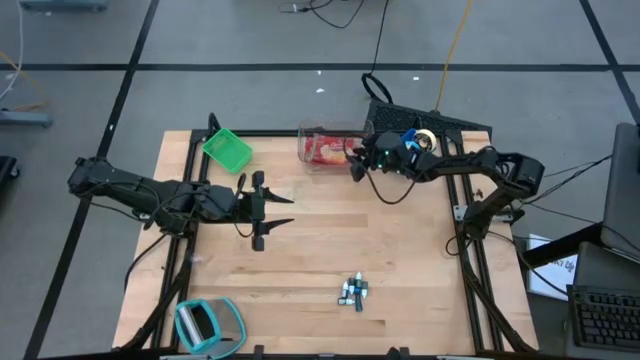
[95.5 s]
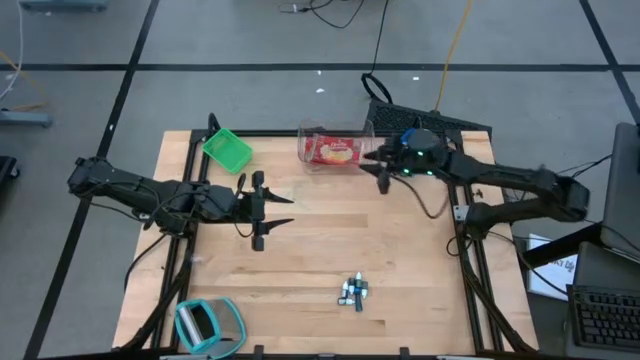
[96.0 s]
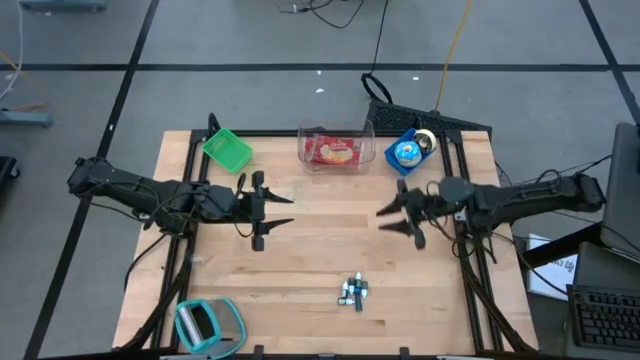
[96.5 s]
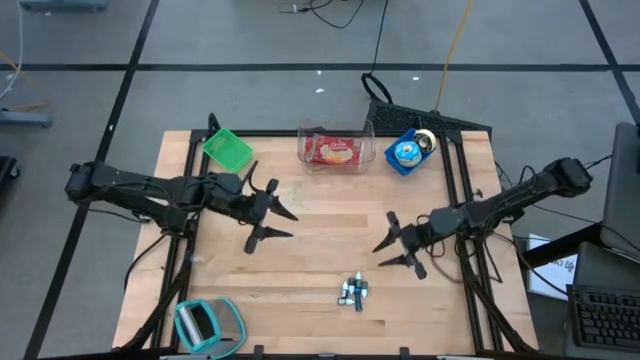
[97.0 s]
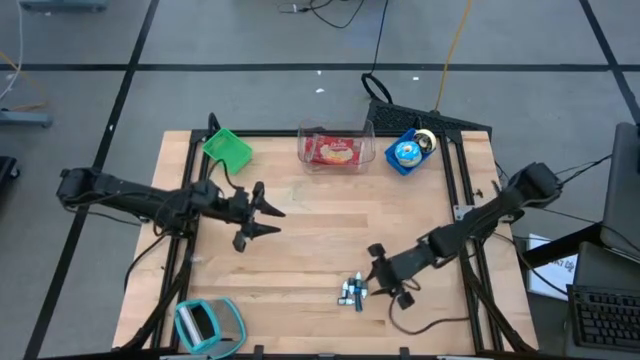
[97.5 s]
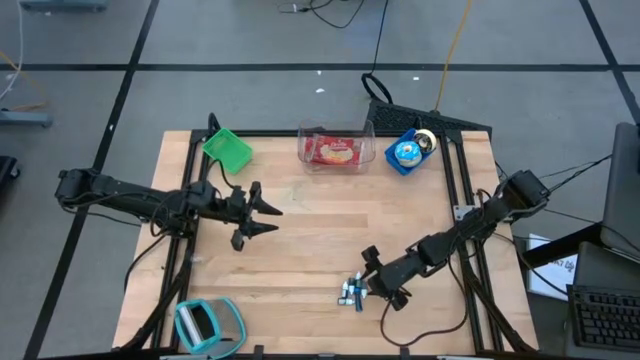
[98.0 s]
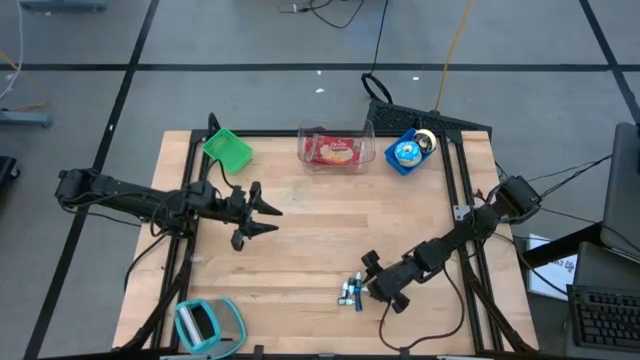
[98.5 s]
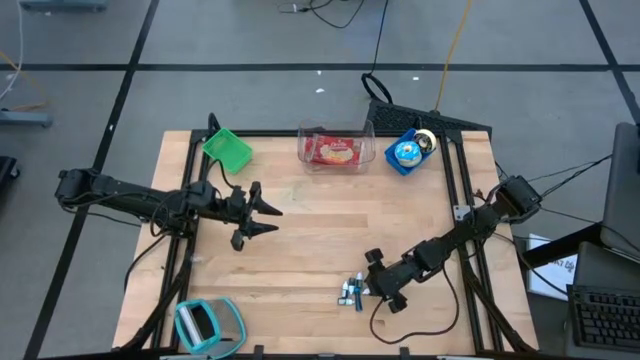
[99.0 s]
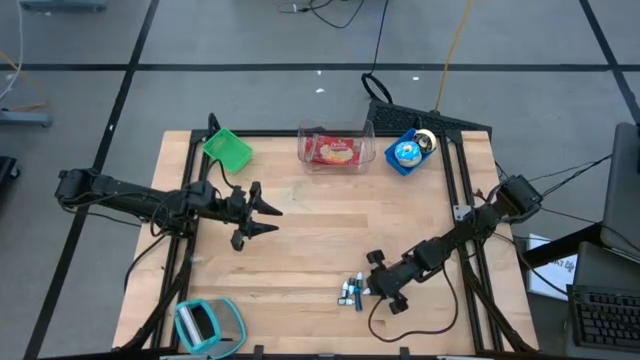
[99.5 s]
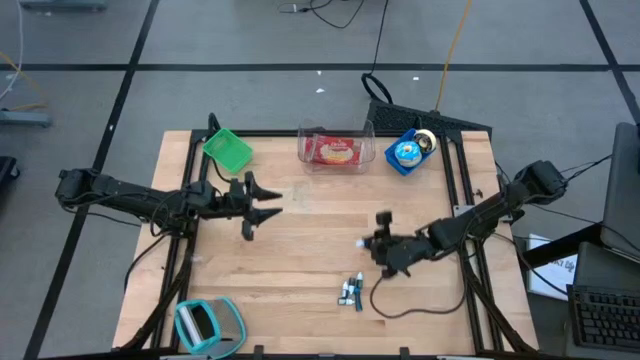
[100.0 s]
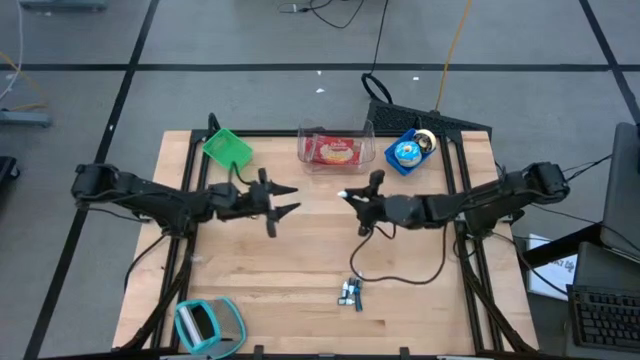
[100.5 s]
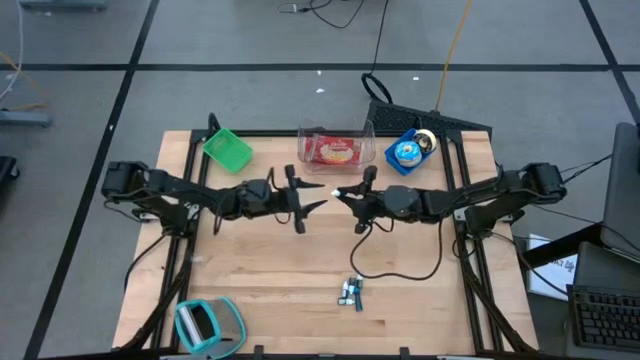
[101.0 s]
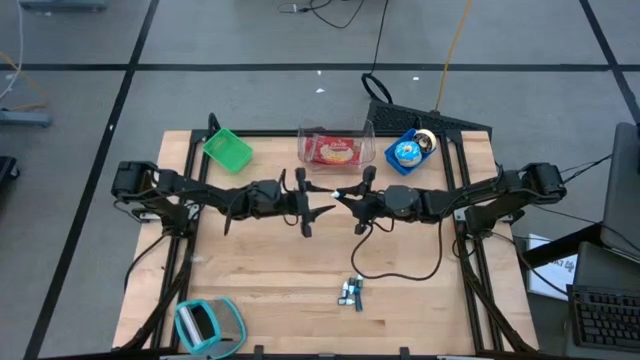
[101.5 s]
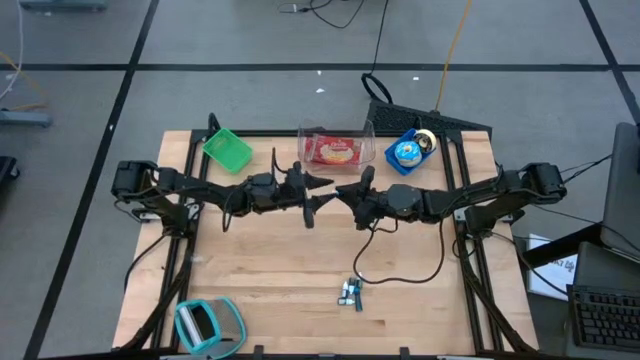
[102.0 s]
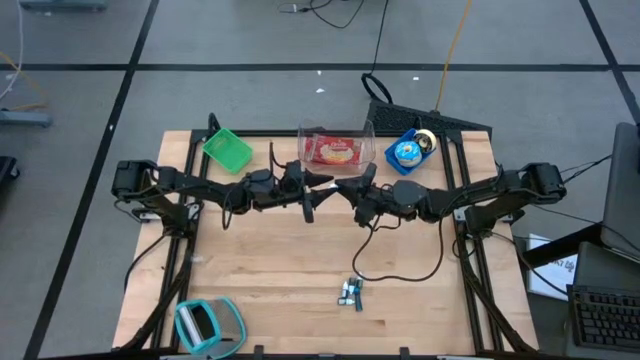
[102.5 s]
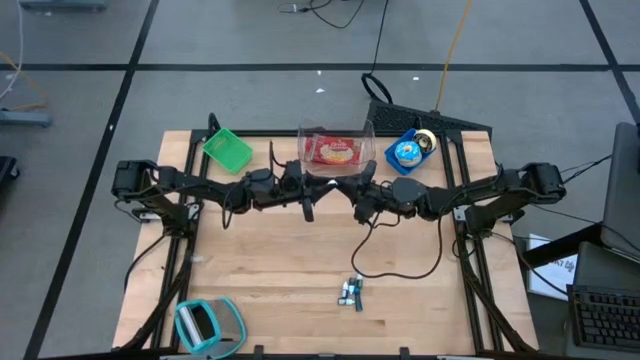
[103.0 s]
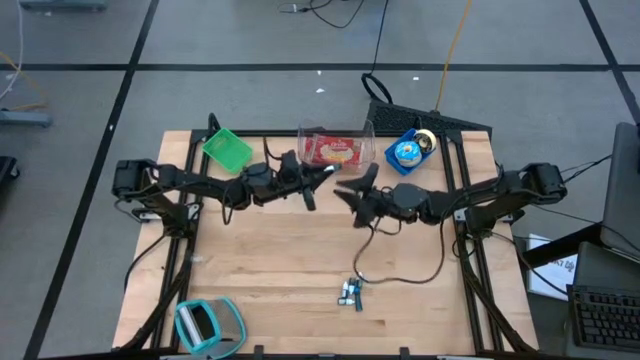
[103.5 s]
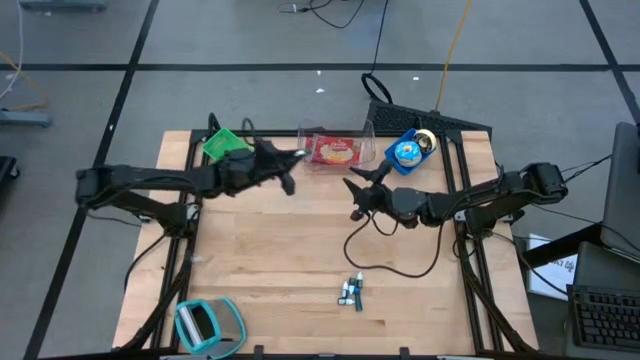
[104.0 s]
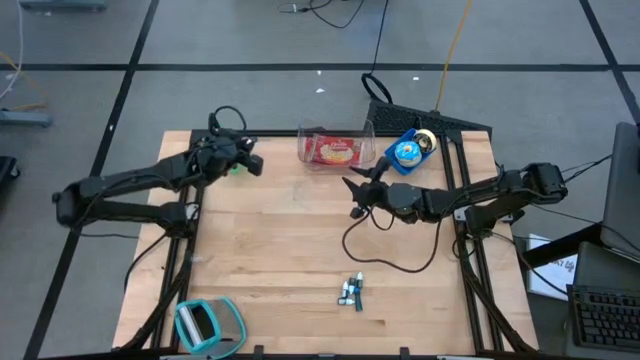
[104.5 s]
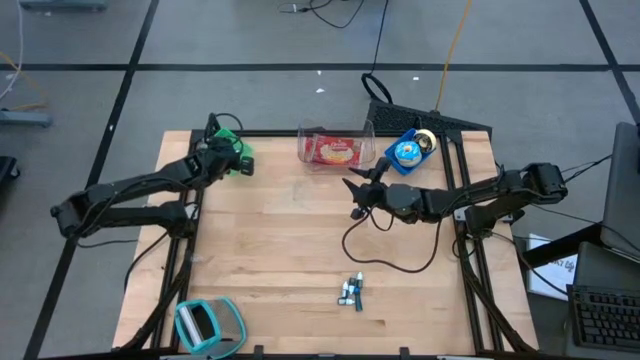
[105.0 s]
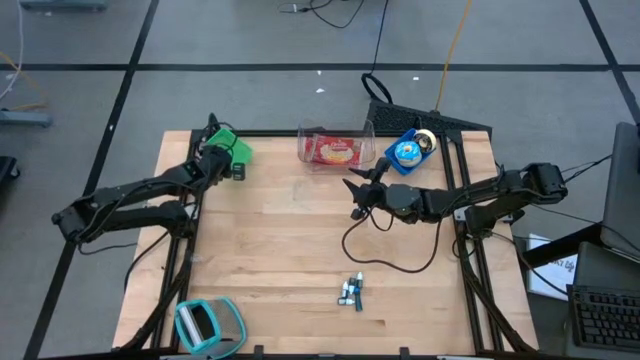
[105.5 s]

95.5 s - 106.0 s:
Put the blue food coloring bottle into the green bin

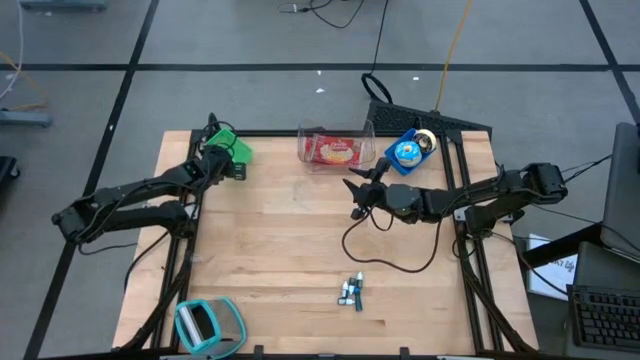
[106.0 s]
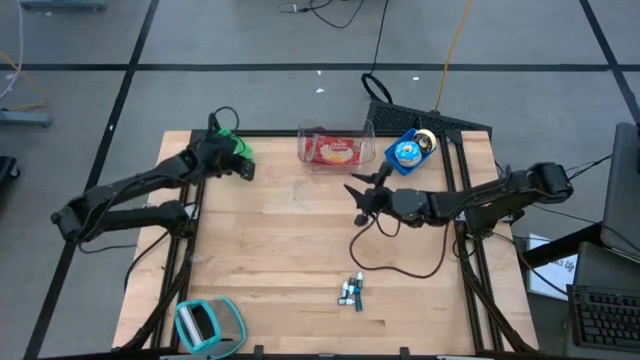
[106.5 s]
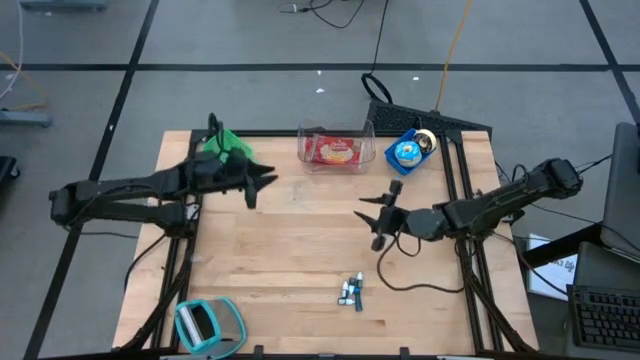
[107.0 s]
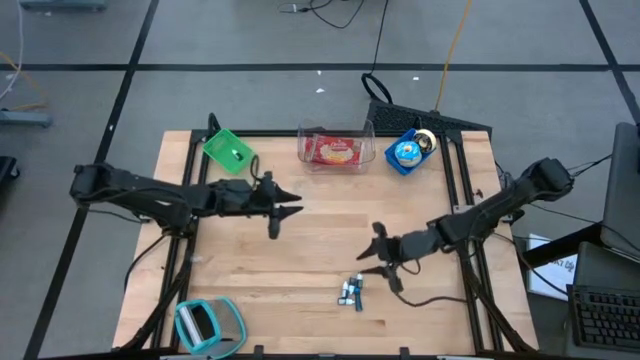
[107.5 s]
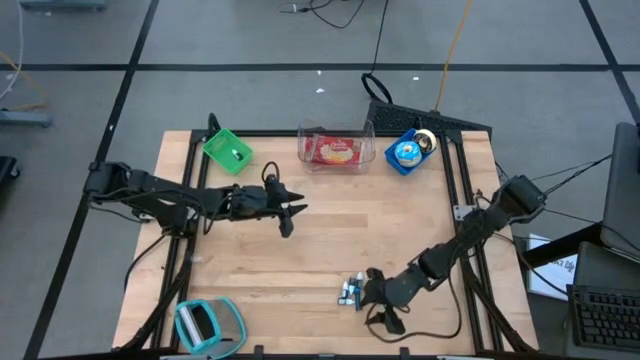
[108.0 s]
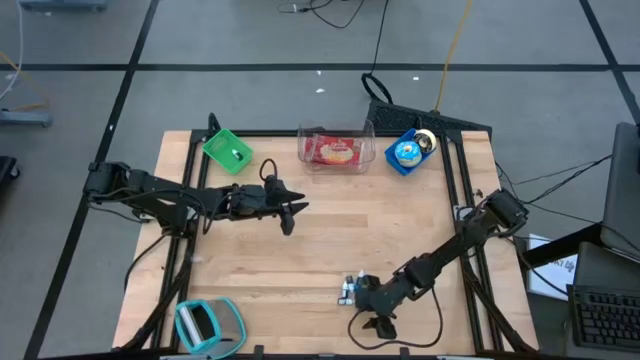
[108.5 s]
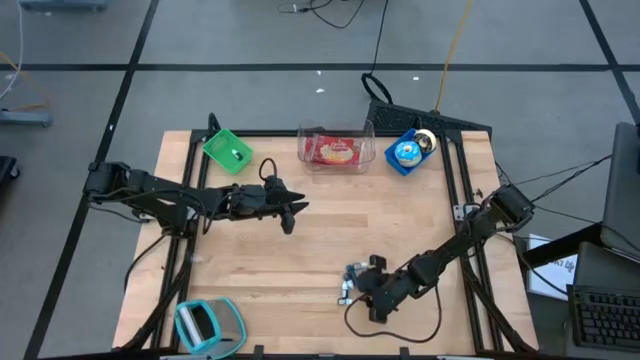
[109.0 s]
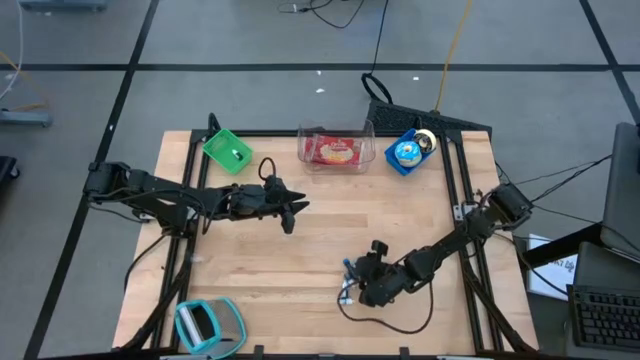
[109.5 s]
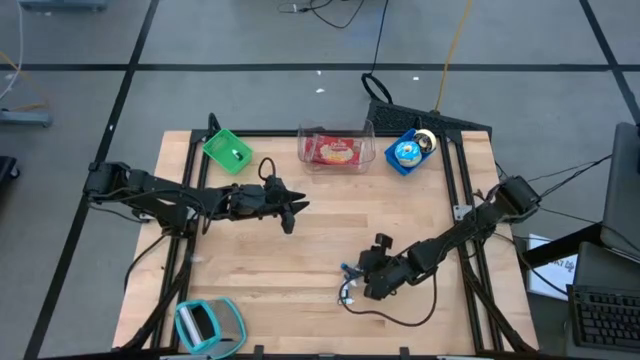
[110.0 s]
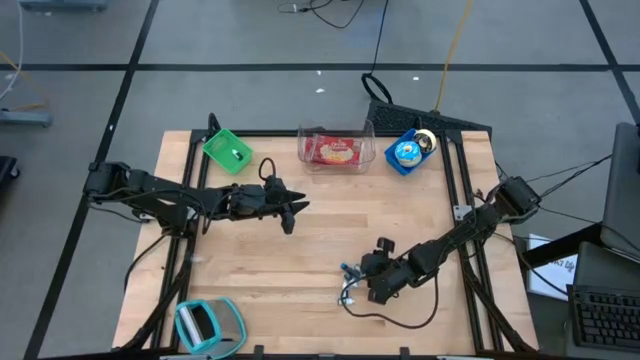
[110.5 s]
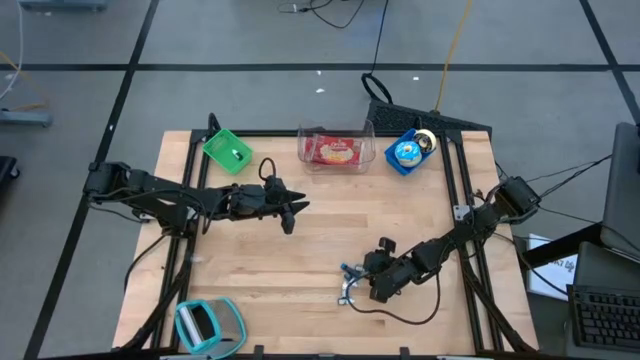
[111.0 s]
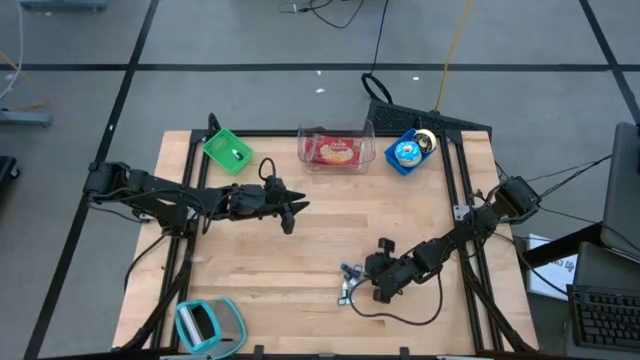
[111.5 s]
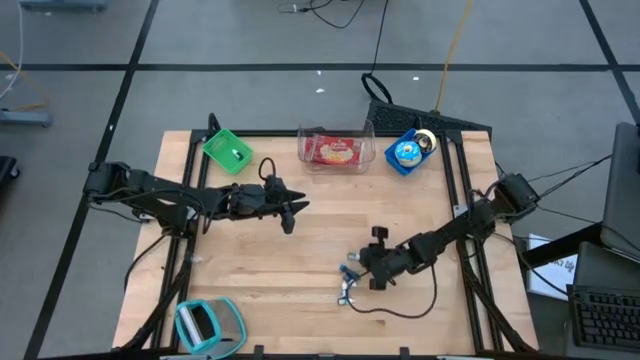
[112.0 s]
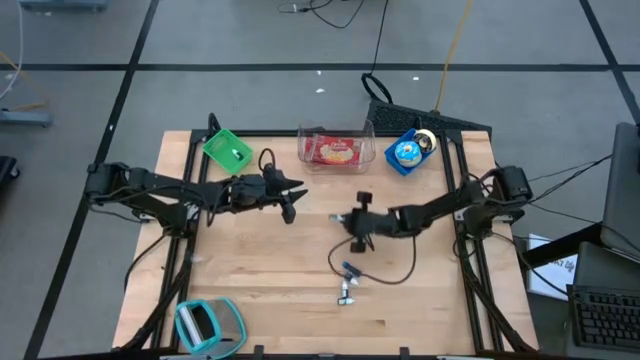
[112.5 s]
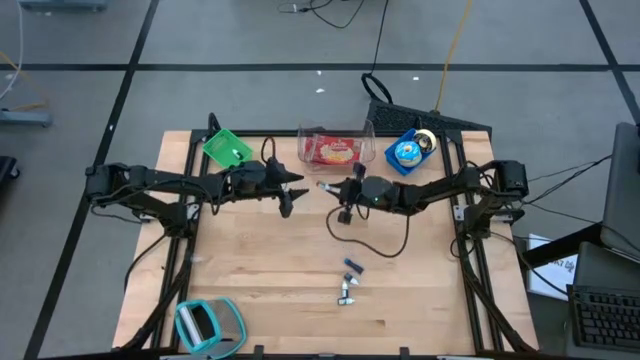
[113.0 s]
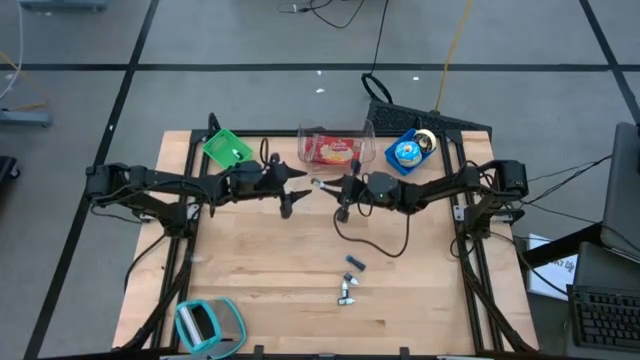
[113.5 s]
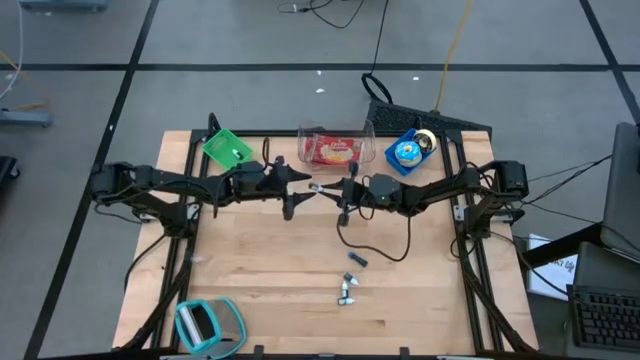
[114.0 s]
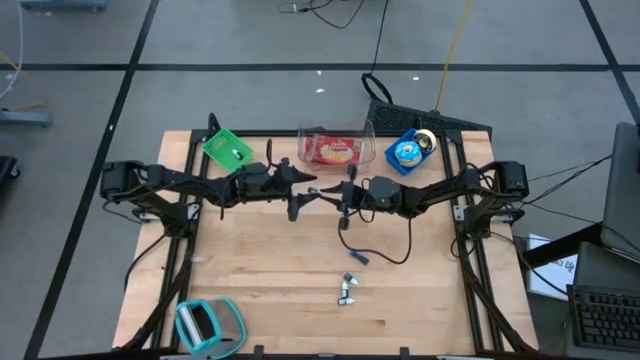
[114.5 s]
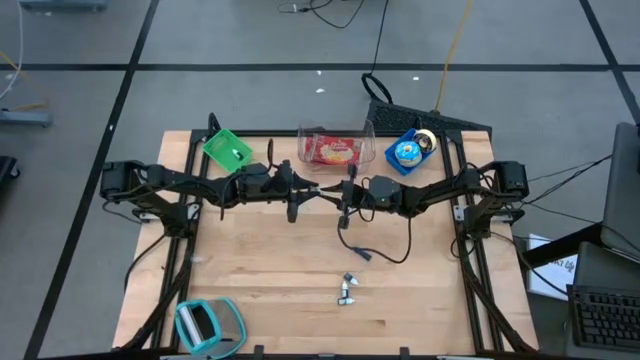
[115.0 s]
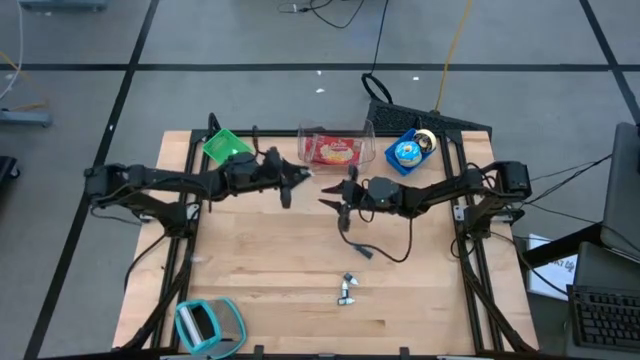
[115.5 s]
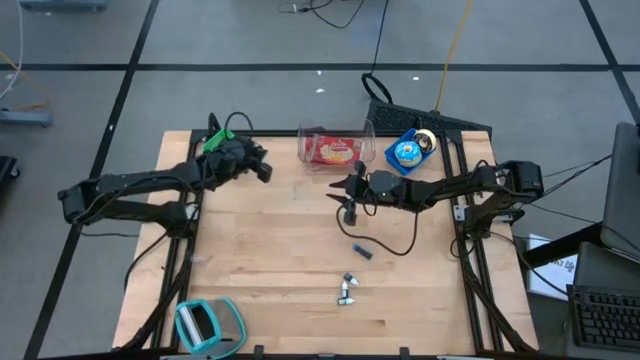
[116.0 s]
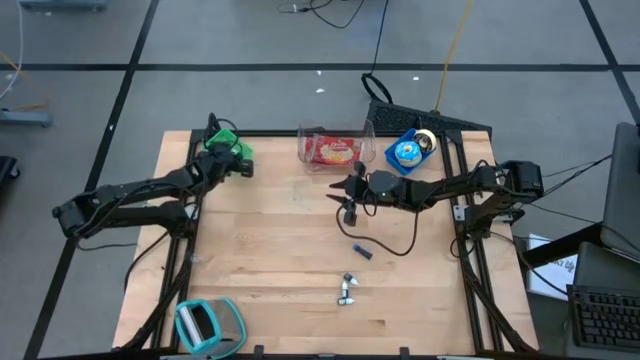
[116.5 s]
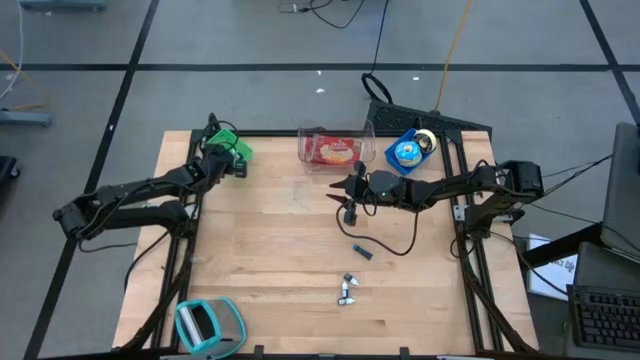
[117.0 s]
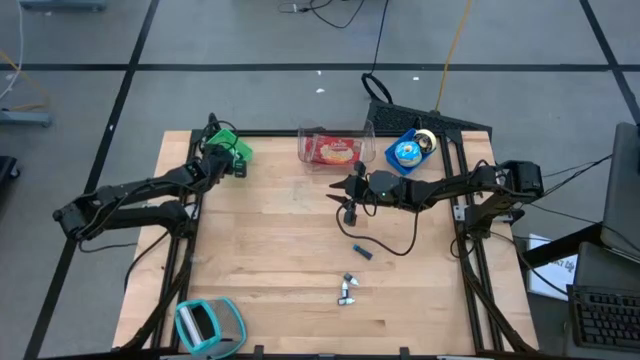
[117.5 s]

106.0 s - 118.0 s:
Put the green food coloring bottle into the green bin
